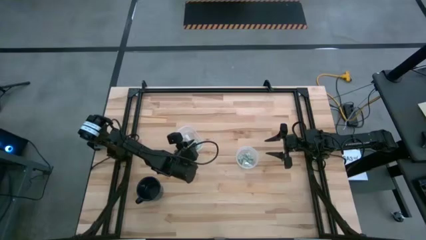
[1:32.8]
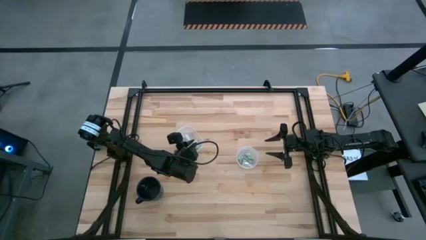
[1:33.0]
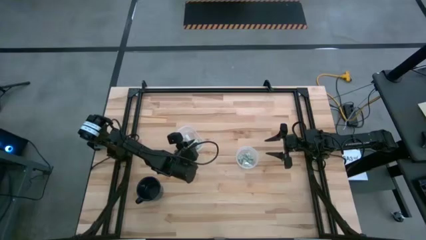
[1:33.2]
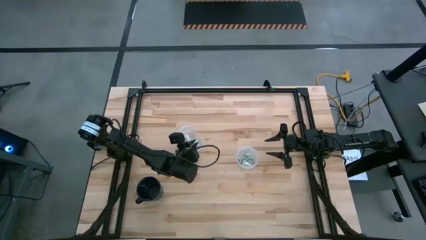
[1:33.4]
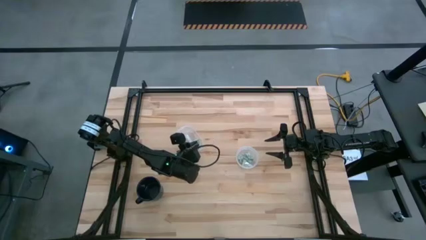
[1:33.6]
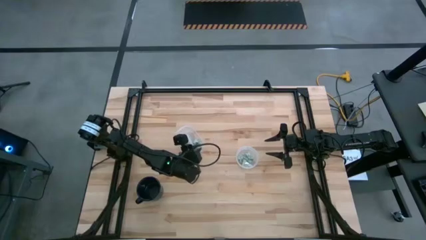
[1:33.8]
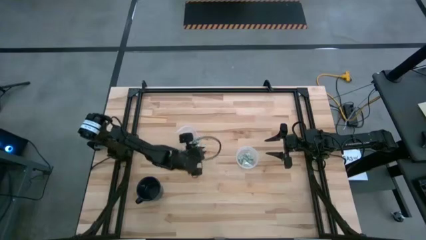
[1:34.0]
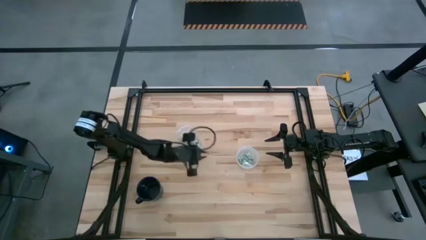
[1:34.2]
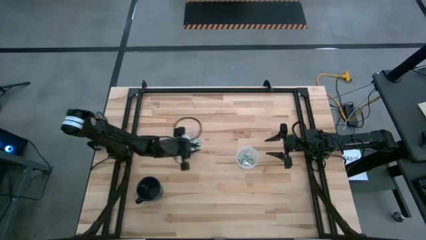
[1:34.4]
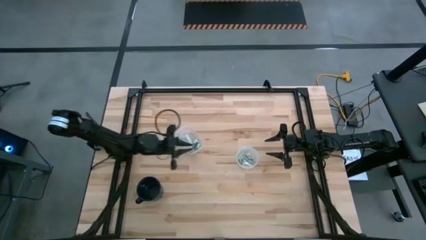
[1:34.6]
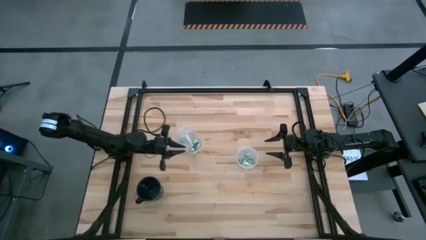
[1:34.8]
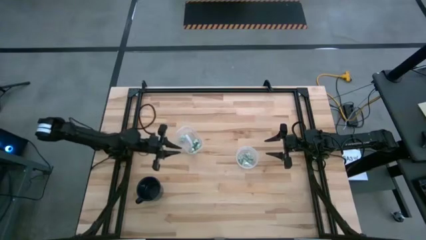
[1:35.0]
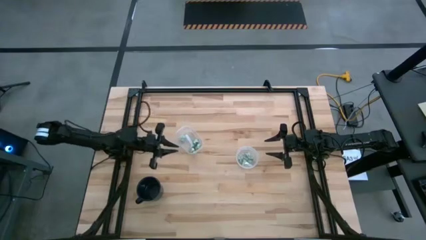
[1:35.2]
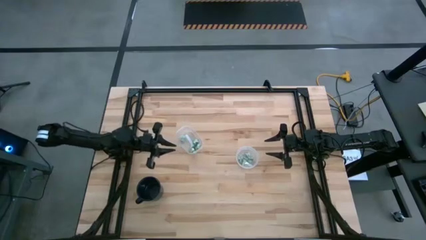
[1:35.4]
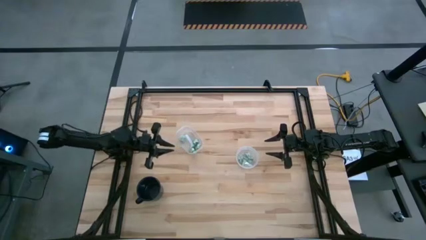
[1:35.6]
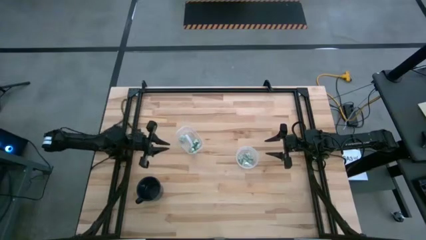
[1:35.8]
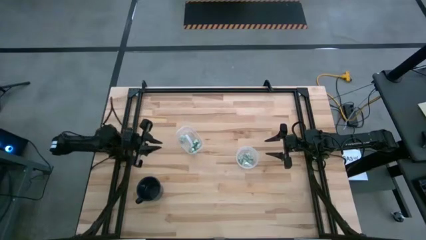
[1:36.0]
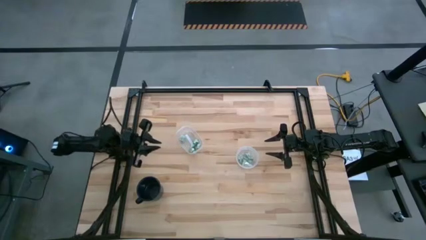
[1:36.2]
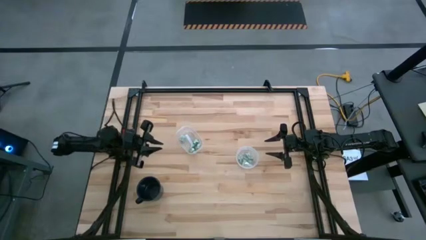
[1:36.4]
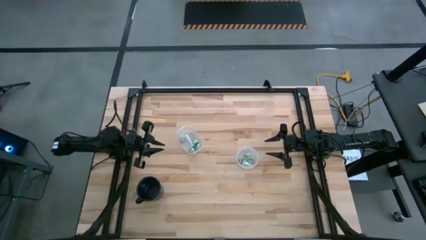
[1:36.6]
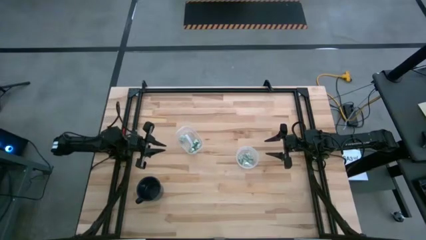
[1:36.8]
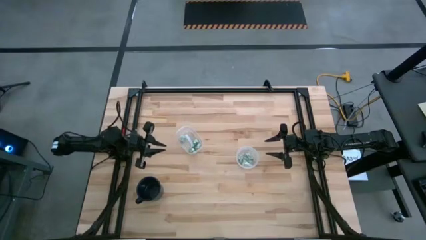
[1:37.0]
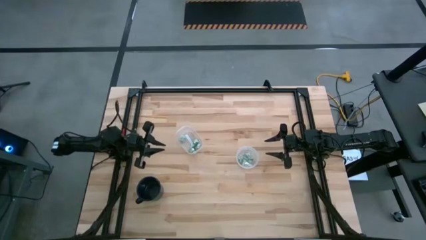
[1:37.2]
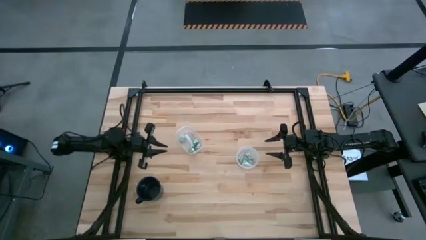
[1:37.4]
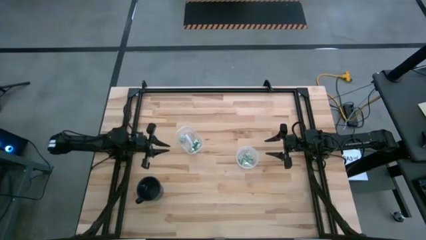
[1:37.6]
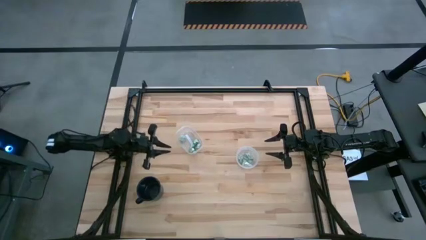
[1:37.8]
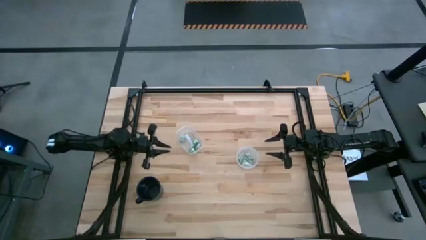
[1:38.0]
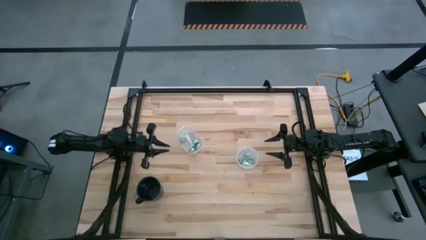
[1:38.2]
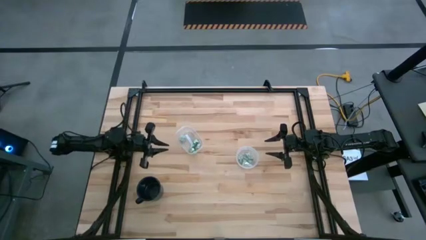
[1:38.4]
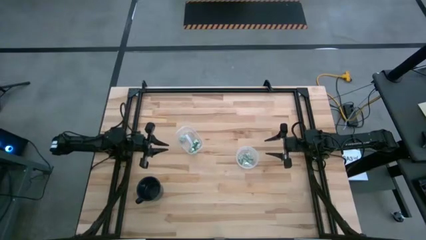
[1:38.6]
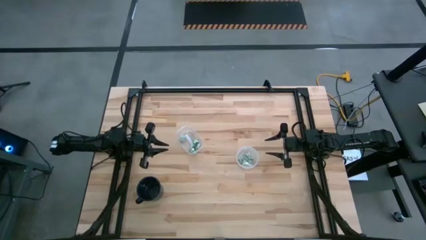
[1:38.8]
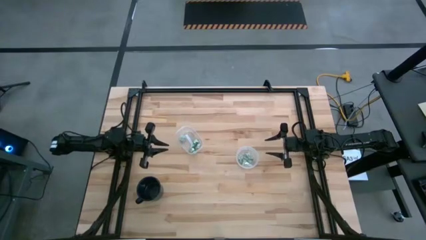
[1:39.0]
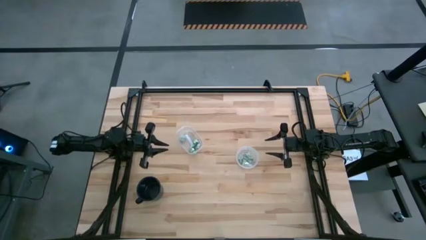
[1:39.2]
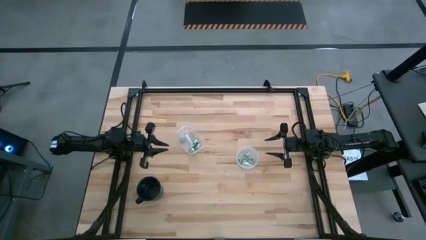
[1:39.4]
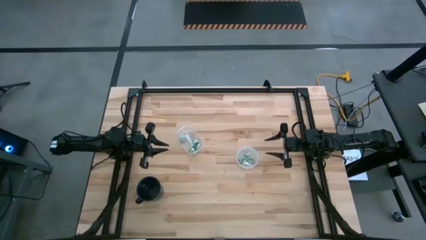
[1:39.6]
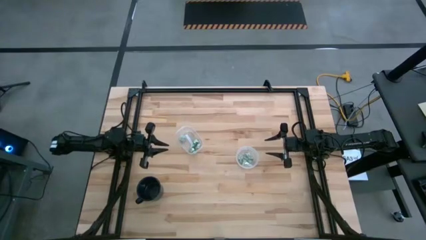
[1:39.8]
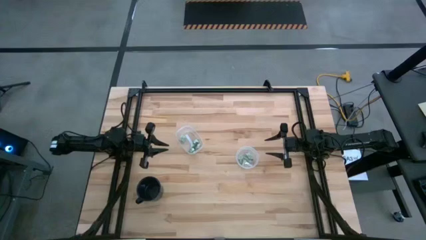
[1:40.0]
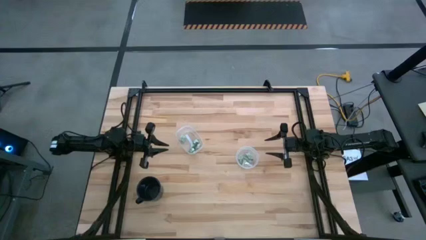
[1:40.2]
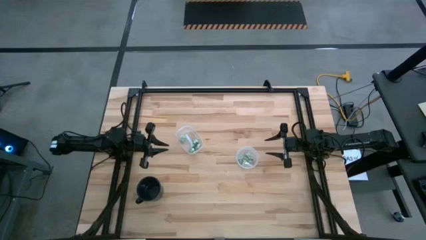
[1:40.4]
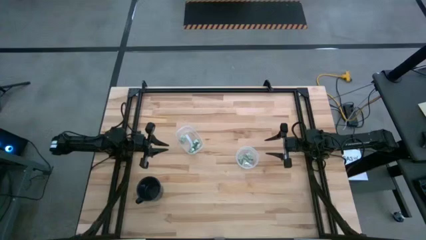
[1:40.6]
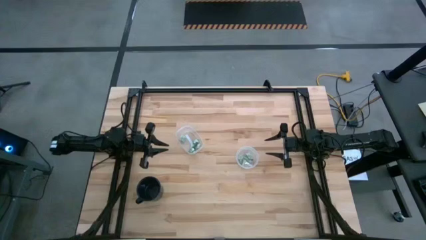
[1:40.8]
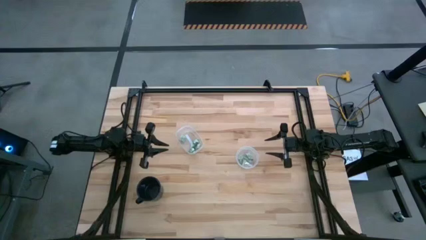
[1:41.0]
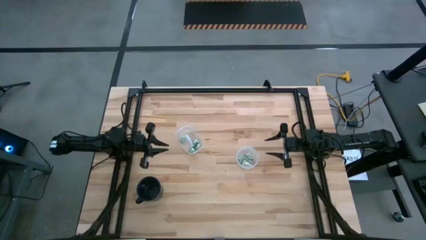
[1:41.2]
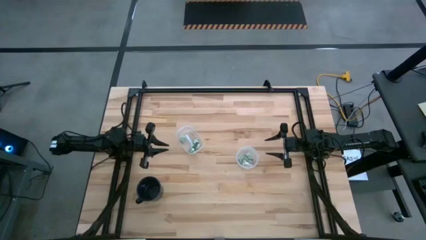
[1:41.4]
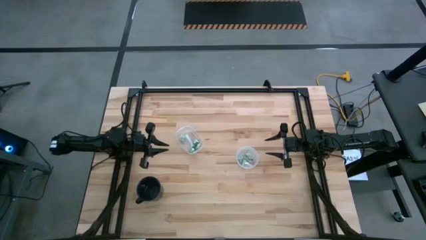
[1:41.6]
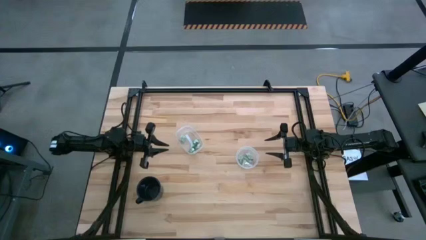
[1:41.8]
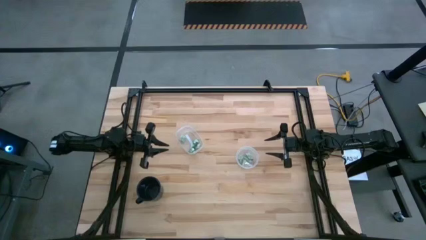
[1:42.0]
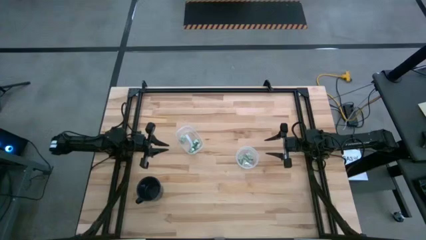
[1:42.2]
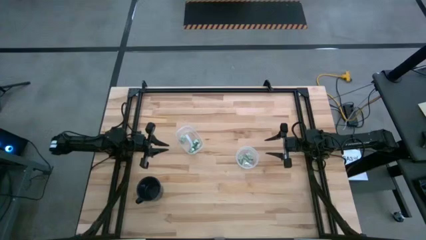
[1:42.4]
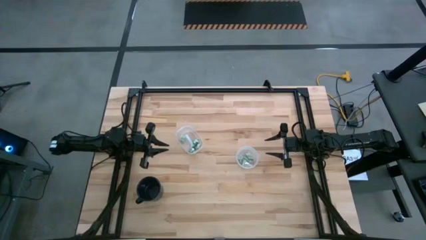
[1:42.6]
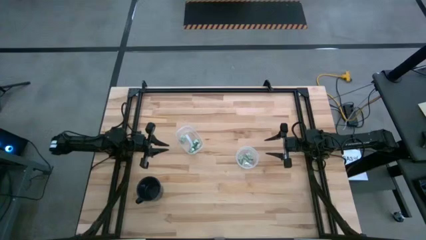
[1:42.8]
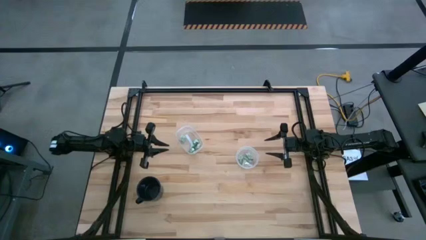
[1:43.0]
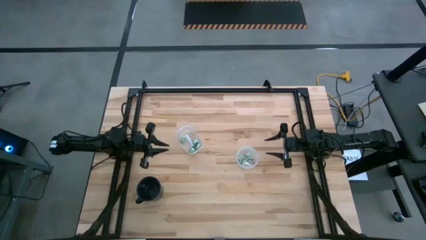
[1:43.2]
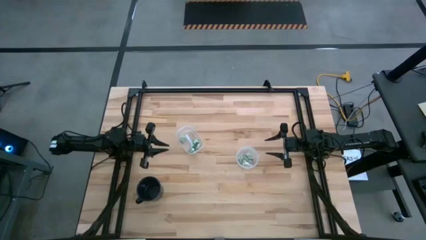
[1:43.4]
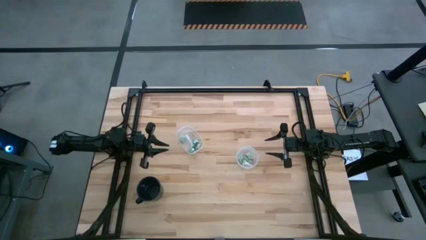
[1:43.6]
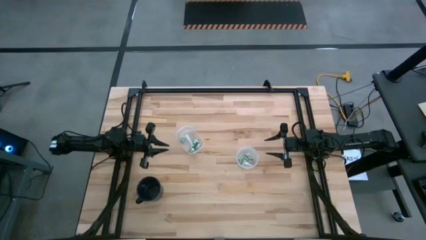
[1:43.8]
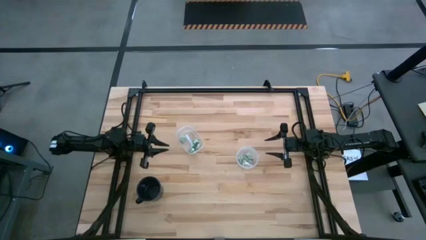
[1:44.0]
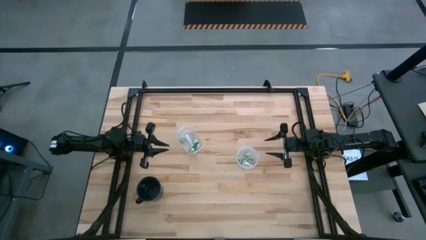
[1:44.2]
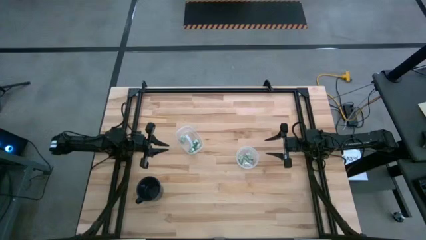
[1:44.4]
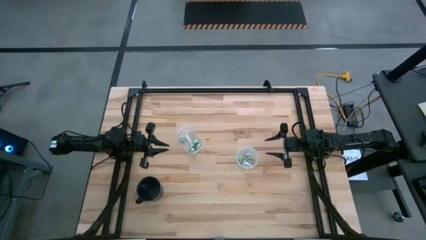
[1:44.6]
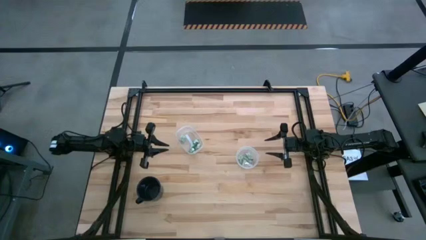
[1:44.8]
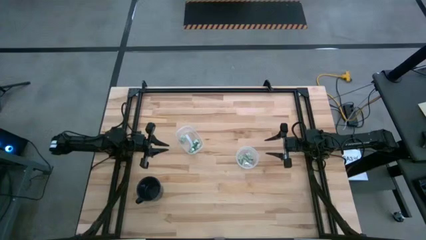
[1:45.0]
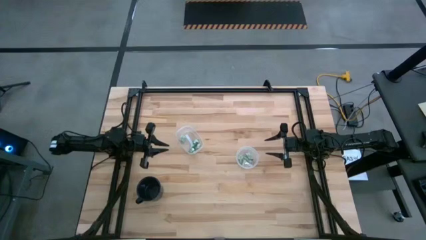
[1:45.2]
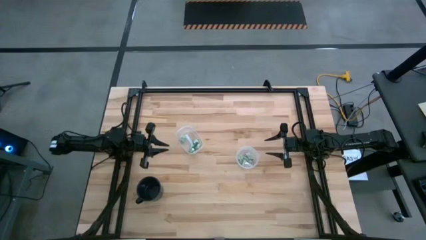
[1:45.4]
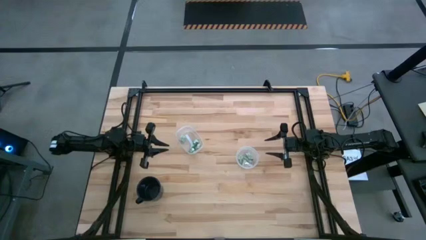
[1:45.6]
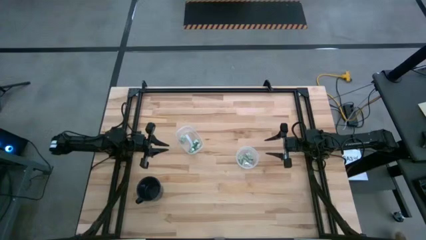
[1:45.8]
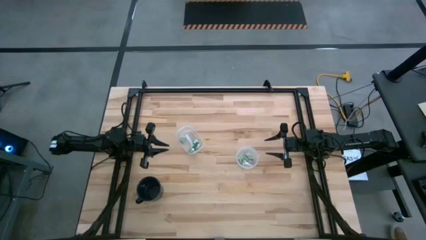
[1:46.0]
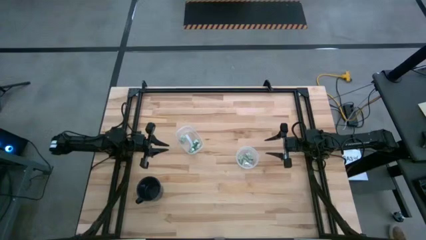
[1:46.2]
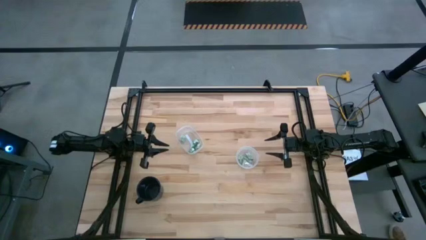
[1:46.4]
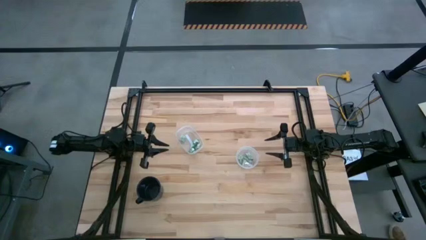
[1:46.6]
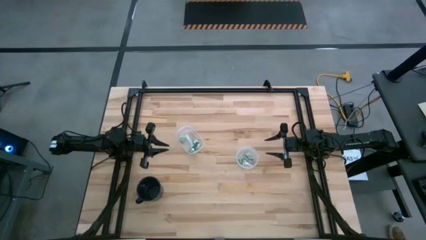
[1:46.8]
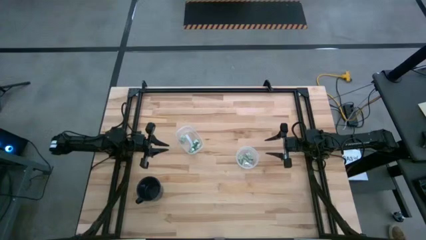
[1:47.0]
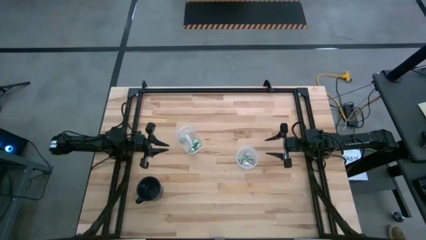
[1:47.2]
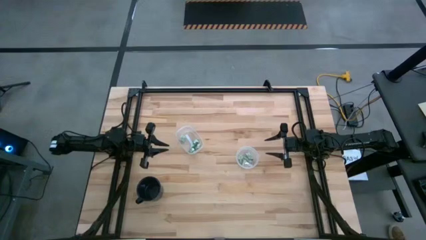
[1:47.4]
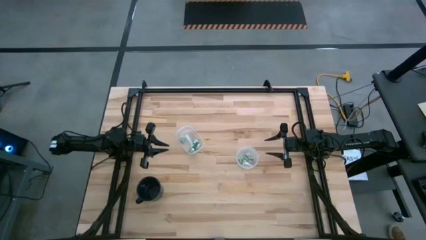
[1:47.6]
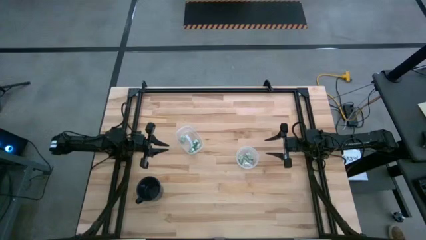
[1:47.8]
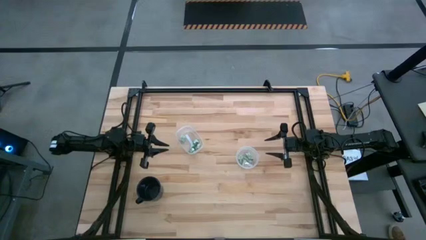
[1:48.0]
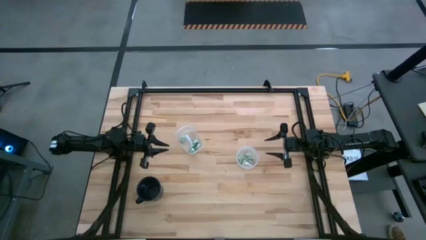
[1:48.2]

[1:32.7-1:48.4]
Task: Pick and place Stevia / Truvia into bins
Return to Home Position
